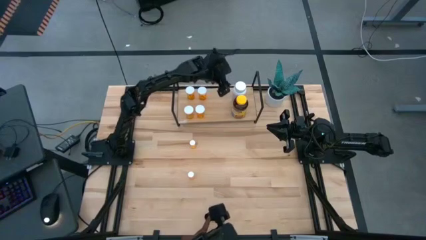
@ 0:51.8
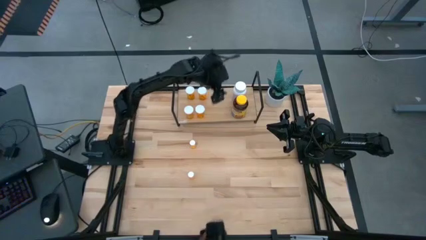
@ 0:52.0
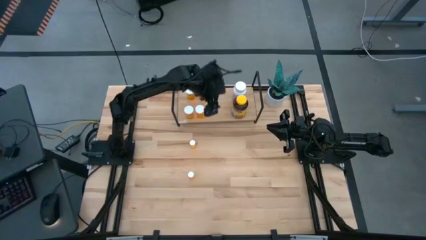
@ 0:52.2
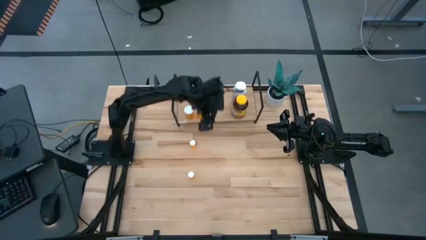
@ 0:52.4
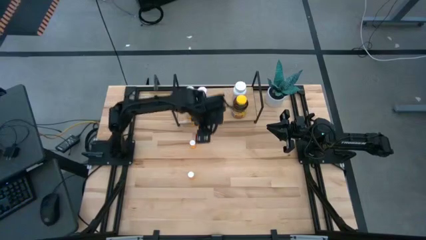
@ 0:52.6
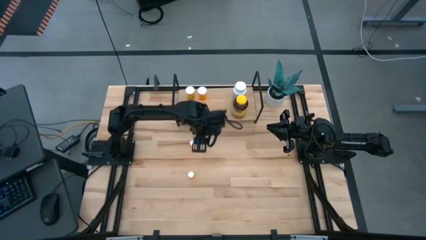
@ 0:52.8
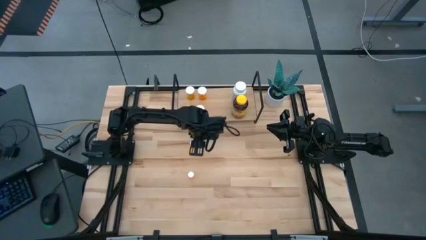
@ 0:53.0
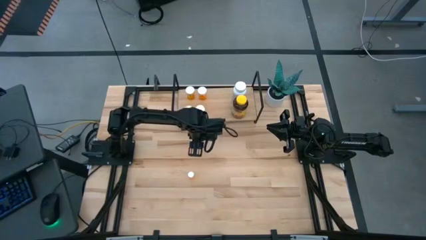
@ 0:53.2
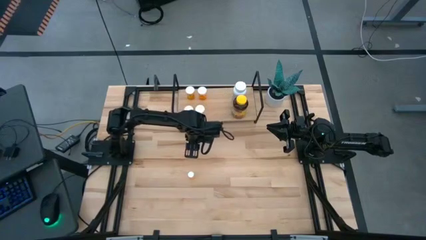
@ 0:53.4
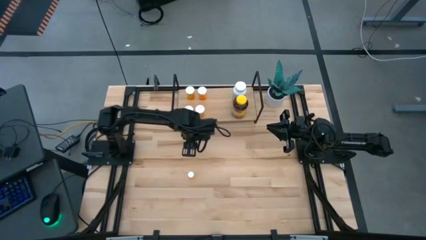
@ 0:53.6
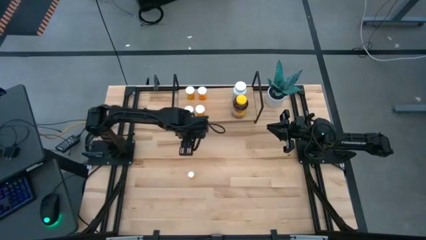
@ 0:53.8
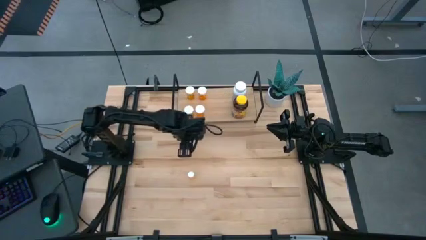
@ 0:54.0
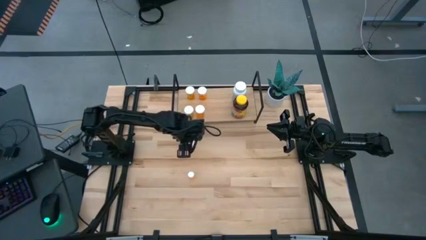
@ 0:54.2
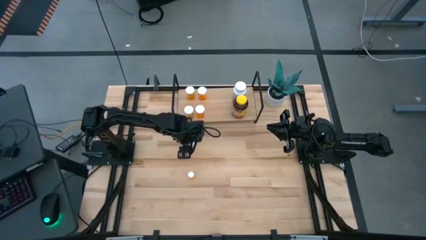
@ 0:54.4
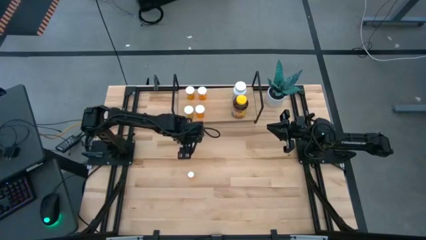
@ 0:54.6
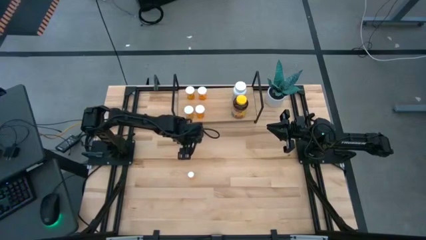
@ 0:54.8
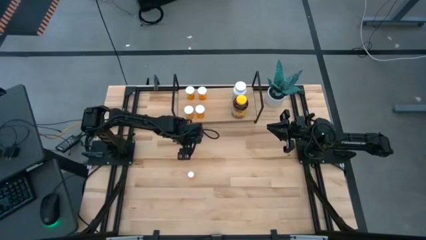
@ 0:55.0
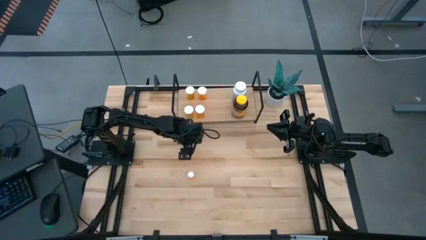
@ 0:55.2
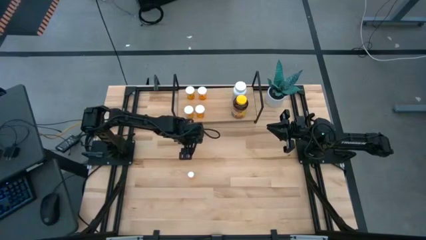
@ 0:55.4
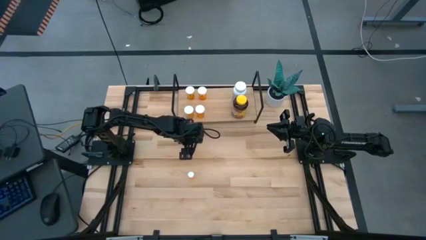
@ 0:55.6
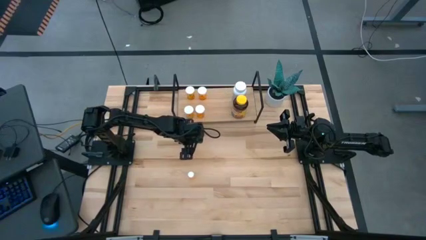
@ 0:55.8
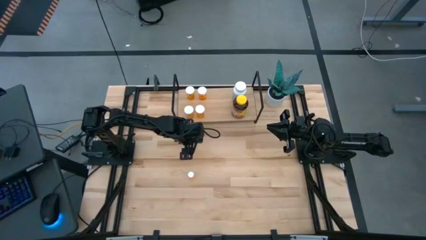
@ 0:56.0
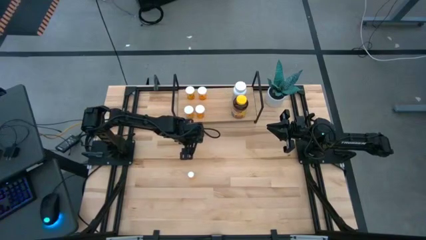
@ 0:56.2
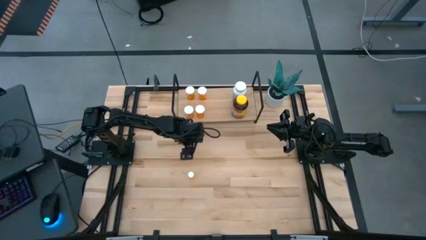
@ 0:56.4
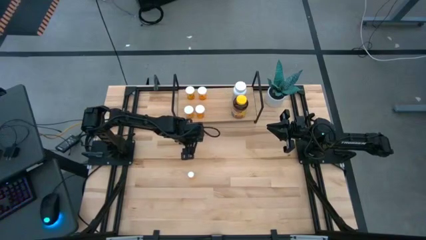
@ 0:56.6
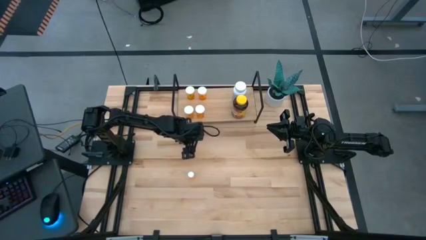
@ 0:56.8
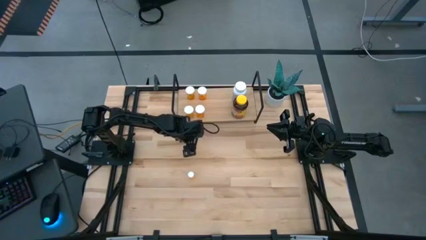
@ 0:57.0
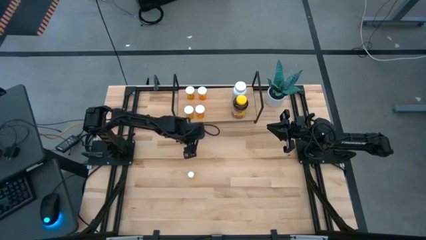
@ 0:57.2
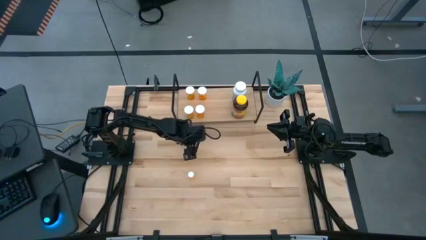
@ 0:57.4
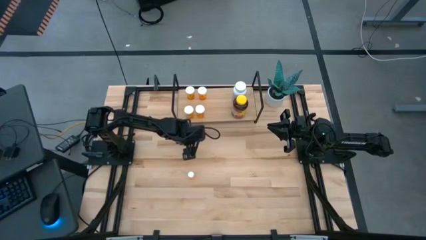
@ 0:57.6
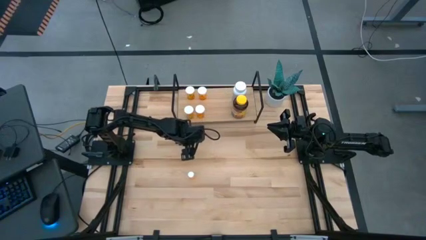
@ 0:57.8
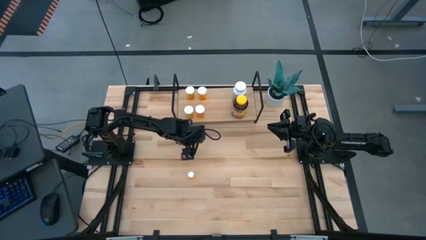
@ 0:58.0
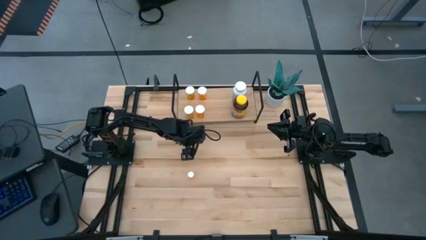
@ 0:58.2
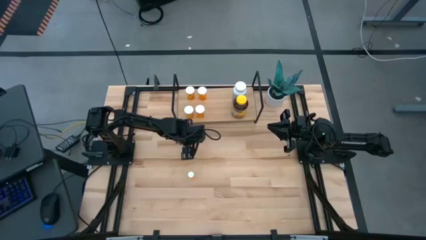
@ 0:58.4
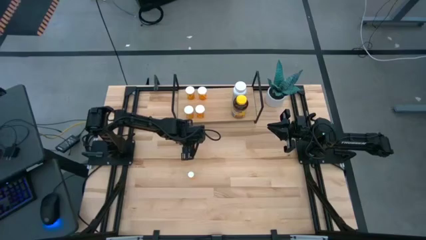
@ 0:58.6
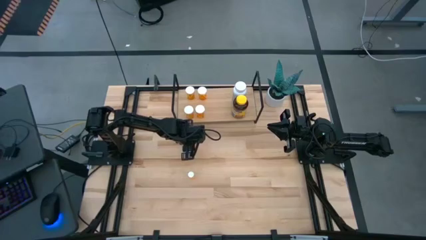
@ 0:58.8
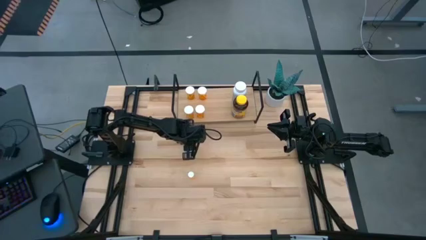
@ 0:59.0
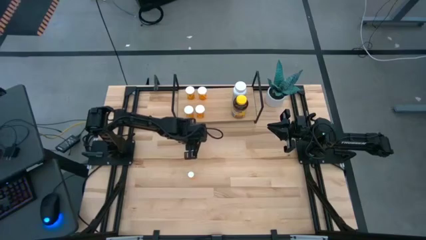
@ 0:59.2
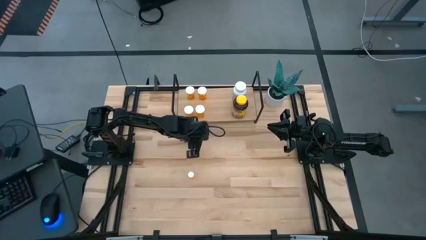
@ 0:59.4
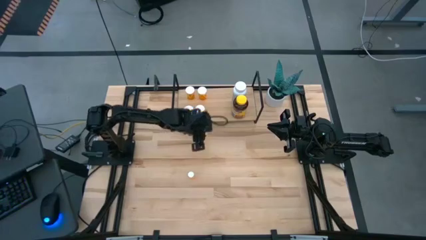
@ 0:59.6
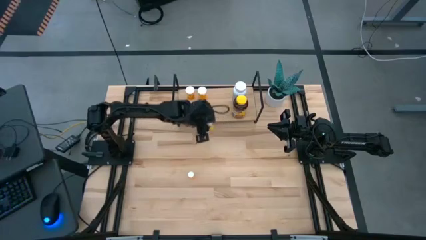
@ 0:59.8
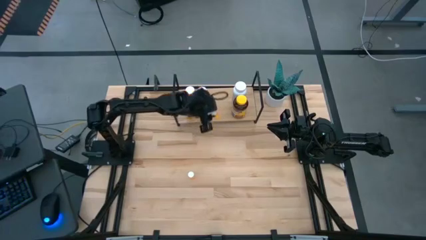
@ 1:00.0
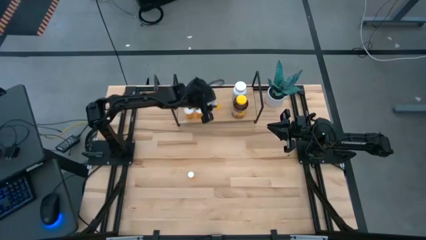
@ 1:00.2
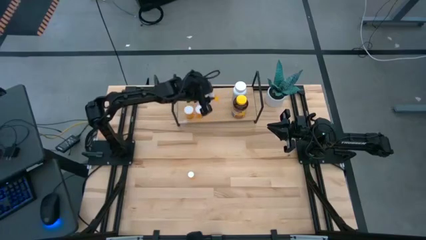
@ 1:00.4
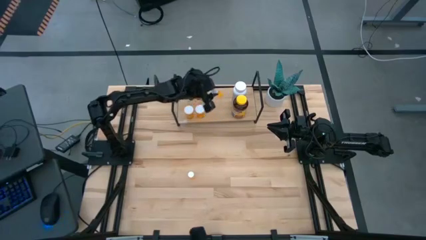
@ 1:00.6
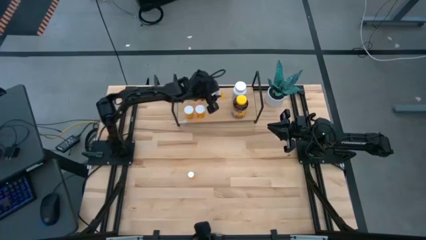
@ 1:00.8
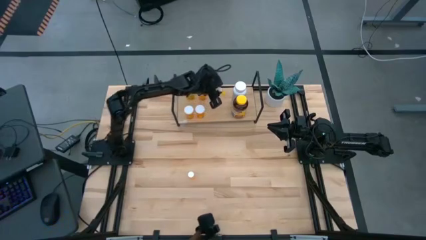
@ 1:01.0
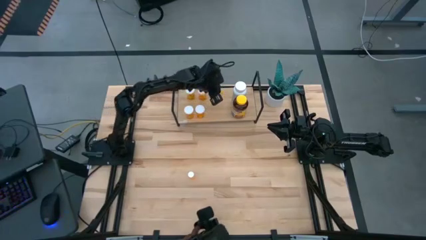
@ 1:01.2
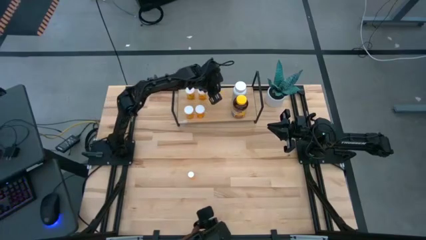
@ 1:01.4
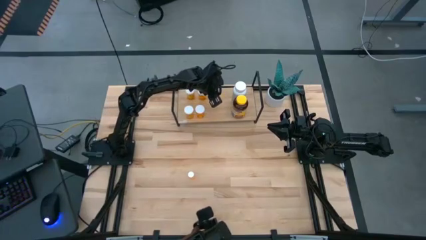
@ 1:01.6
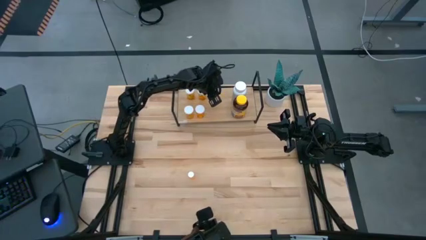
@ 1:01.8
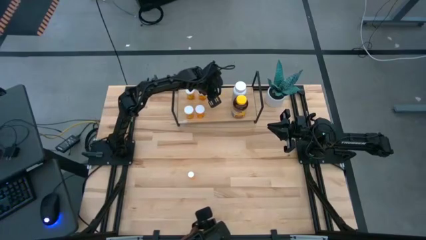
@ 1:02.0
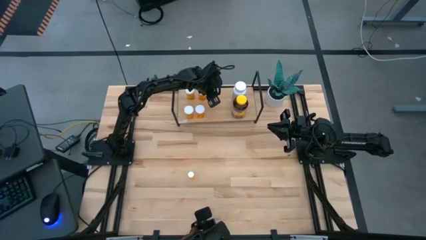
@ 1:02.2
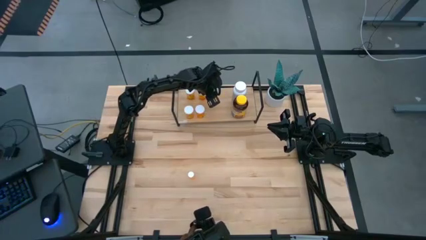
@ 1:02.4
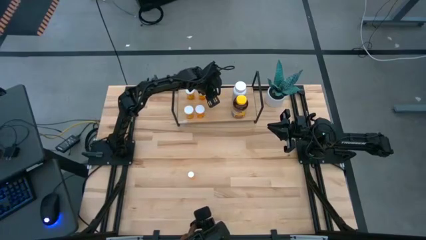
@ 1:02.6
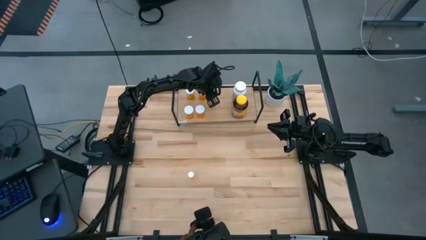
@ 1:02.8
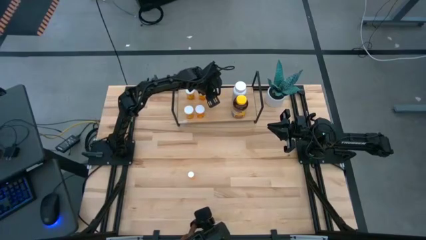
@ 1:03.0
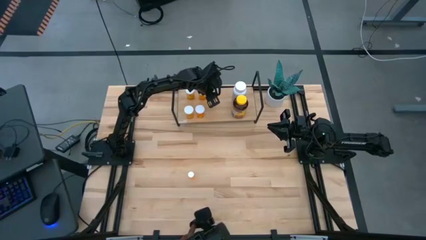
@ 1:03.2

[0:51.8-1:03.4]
Task: Pick and place medicine bottles onto shelf by color
Put the top small orange pill bottle on the shelf

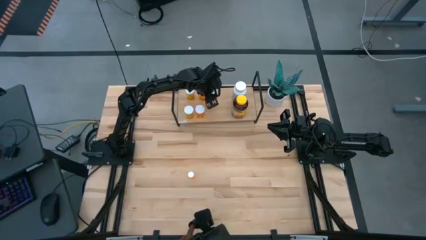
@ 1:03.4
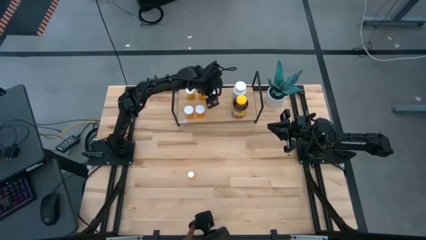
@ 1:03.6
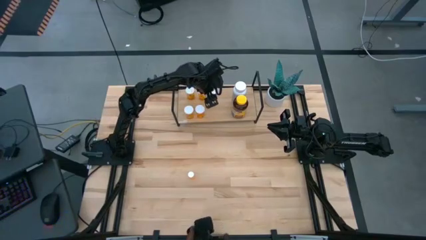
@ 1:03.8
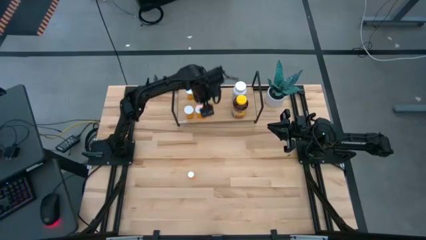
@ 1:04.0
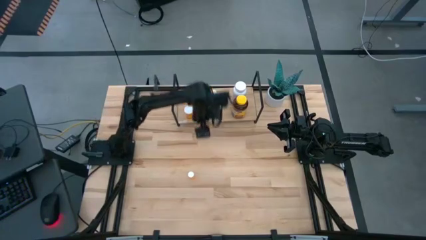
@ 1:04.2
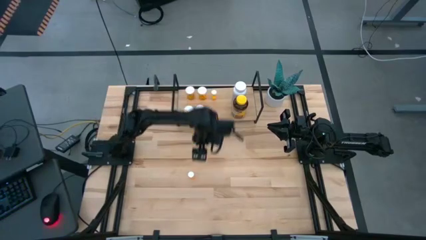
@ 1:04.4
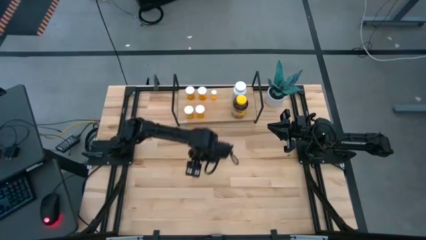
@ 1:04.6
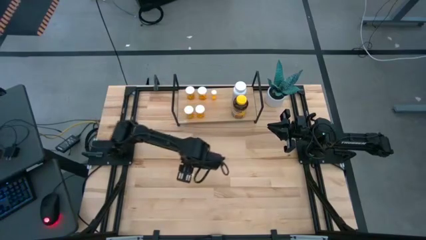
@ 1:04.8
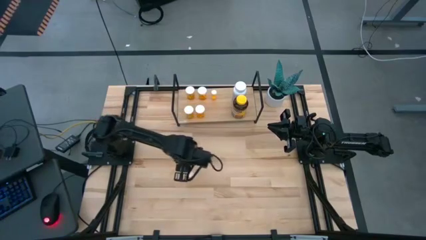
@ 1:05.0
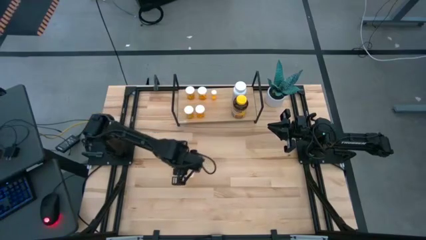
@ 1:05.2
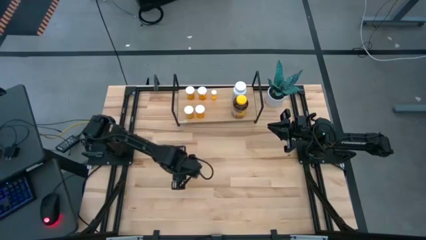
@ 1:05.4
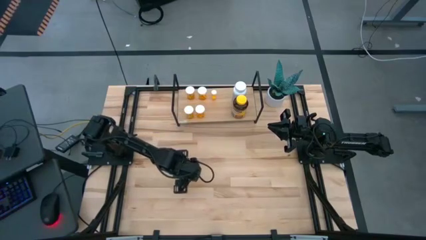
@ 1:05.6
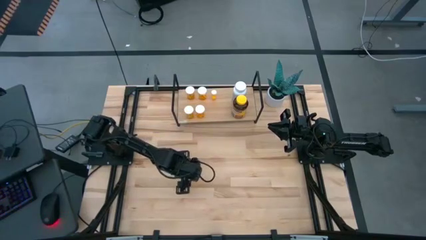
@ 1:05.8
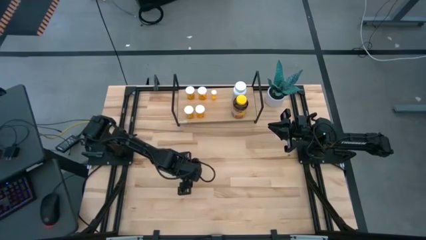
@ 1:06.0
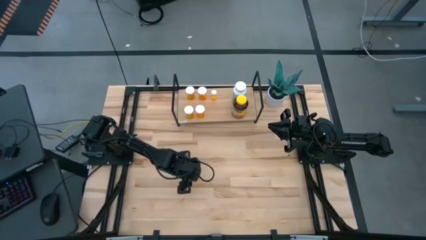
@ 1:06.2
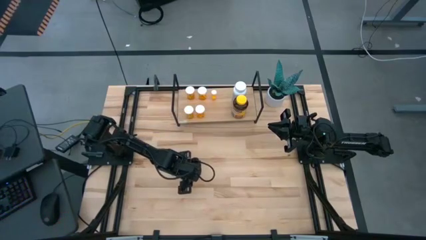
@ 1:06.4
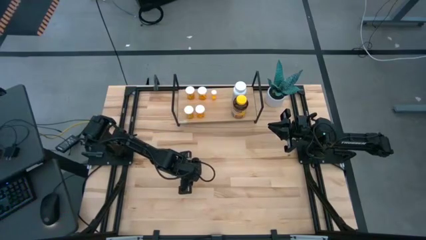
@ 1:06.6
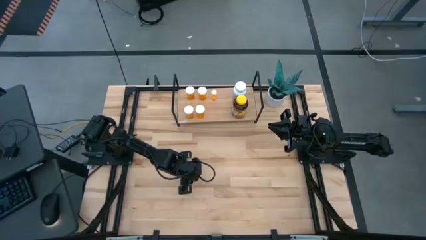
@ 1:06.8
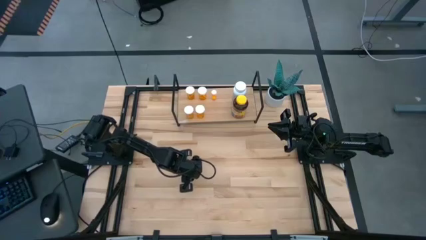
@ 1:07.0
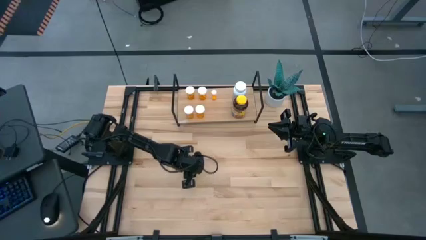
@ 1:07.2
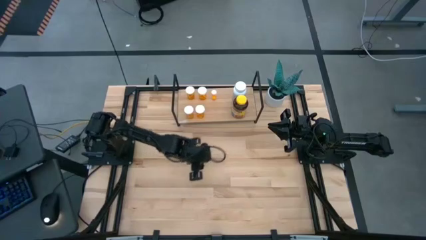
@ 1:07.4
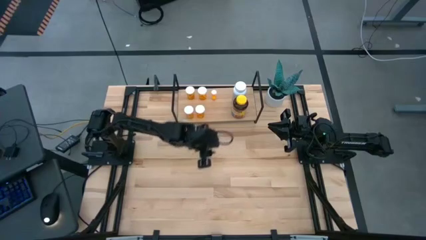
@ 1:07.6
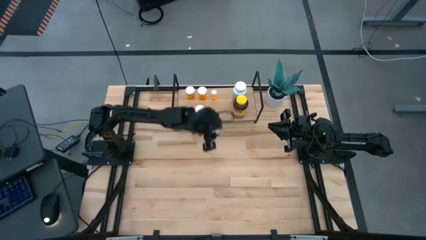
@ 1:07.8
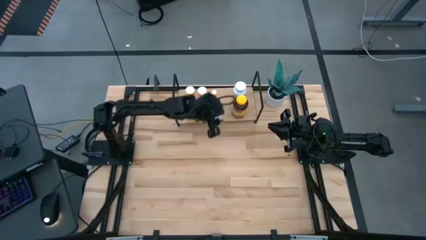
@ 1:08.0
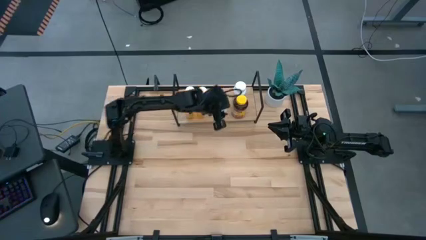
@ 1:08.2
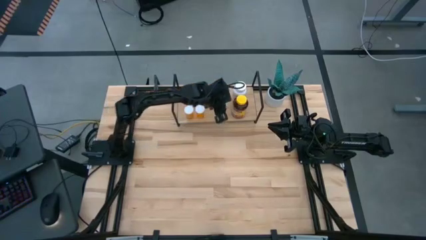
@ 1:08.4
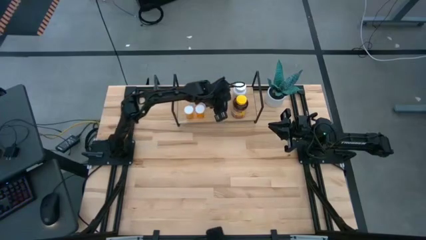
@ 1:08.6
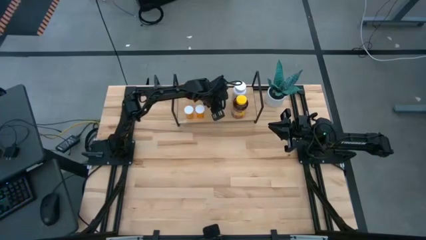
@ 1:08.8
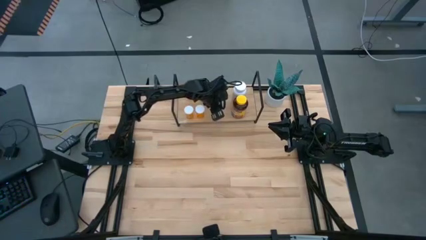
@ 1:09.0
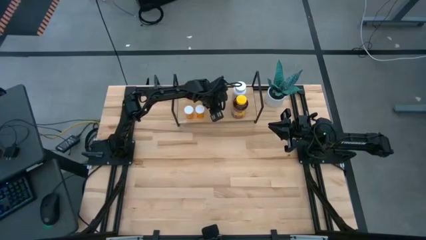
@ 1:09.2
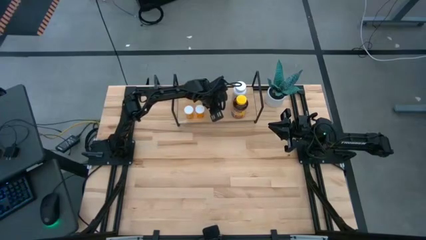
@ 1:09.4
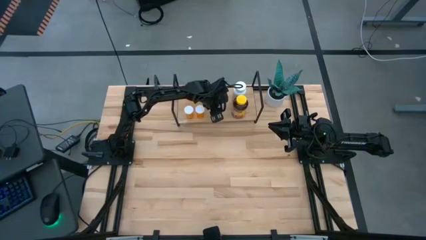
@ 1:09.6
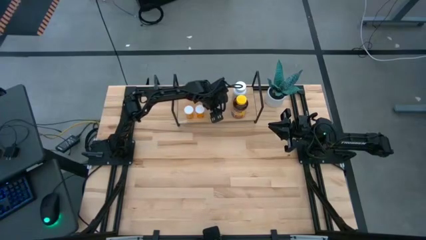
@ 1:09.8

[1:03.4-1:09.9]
Put the small orange pill bottle on the shelf
